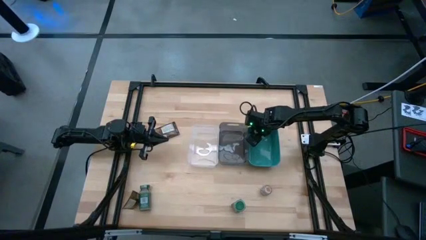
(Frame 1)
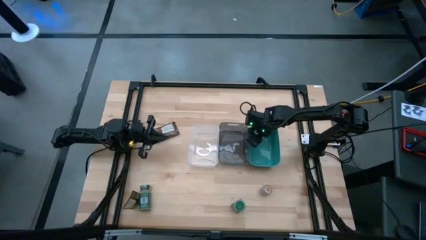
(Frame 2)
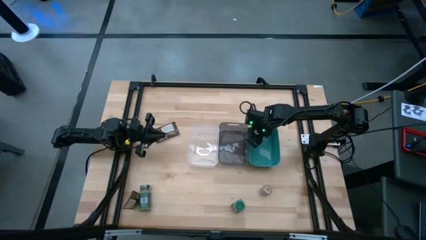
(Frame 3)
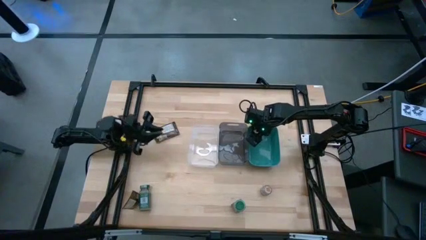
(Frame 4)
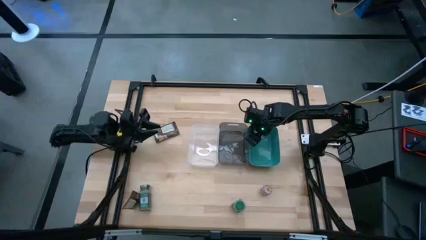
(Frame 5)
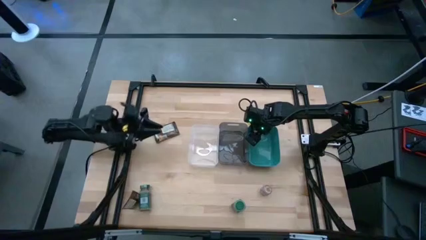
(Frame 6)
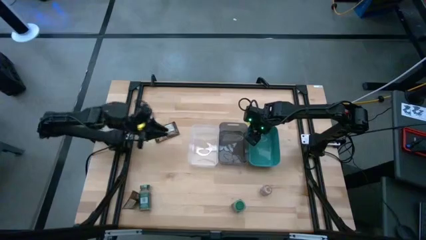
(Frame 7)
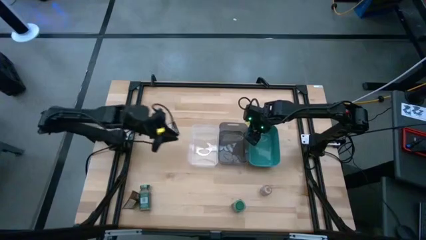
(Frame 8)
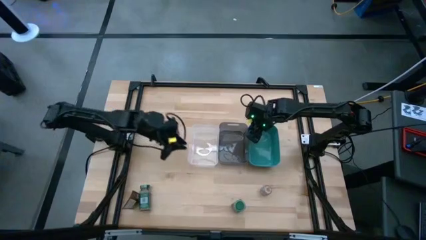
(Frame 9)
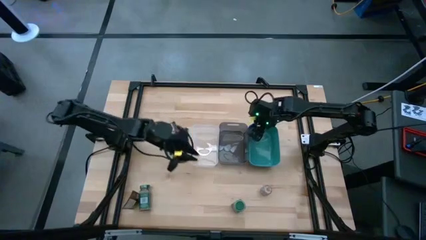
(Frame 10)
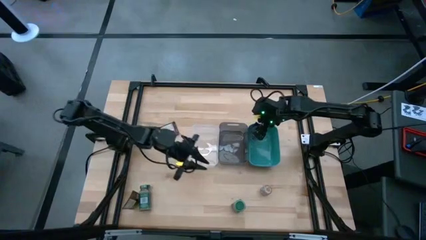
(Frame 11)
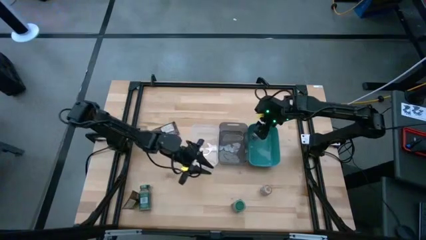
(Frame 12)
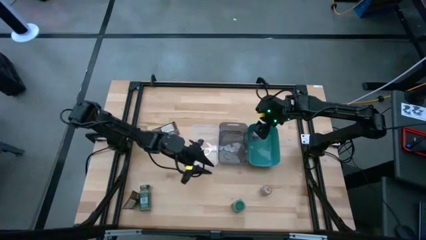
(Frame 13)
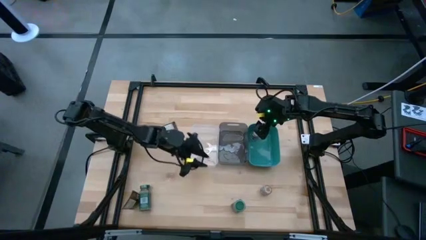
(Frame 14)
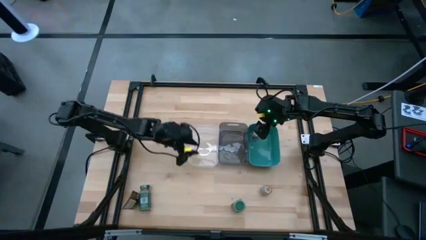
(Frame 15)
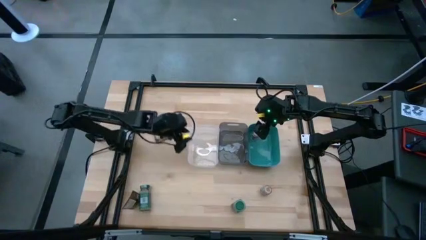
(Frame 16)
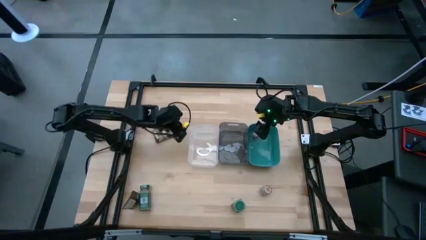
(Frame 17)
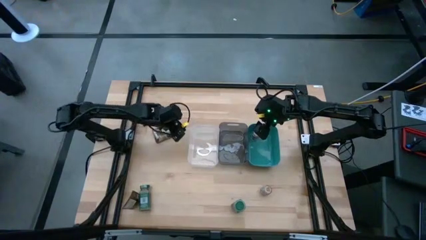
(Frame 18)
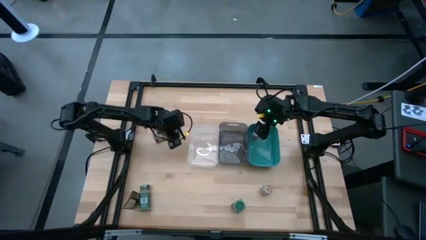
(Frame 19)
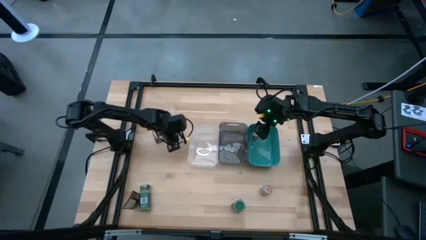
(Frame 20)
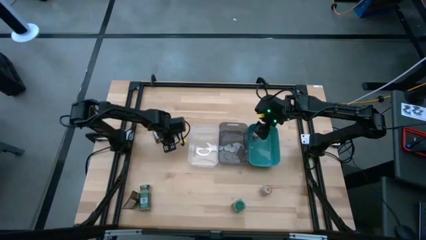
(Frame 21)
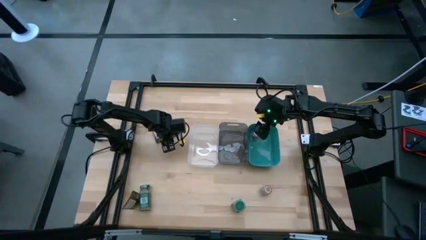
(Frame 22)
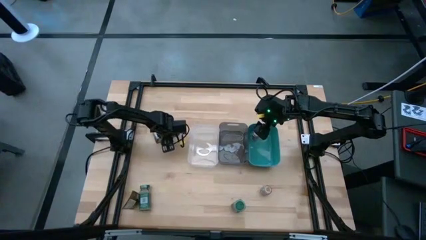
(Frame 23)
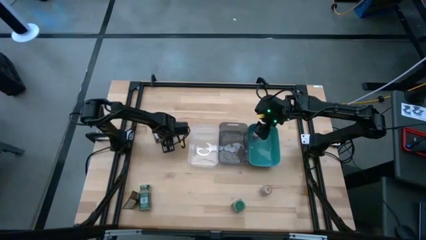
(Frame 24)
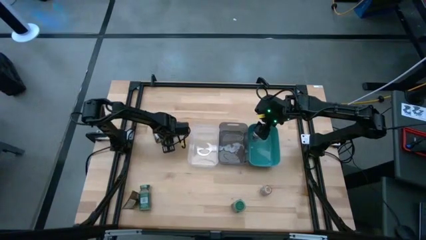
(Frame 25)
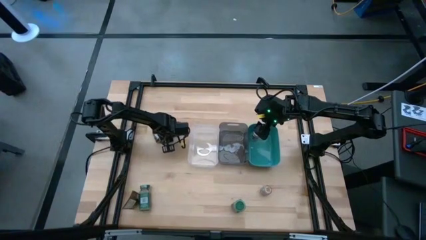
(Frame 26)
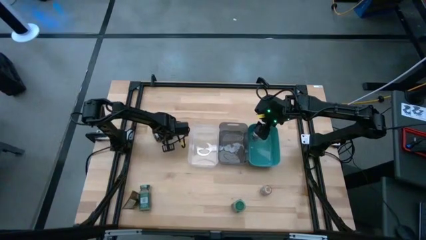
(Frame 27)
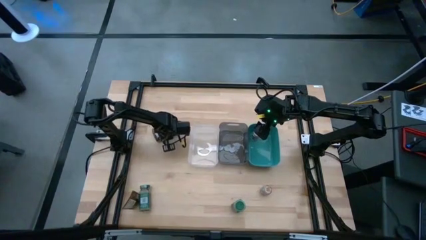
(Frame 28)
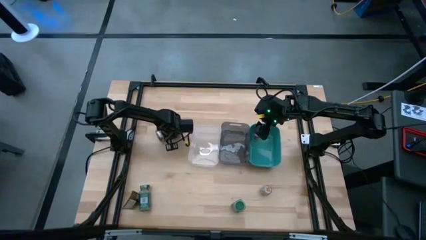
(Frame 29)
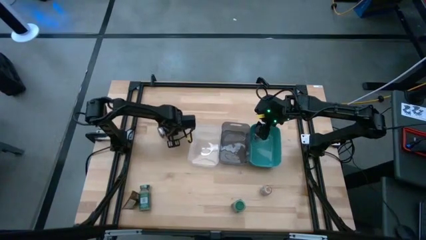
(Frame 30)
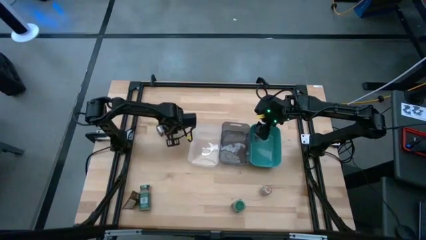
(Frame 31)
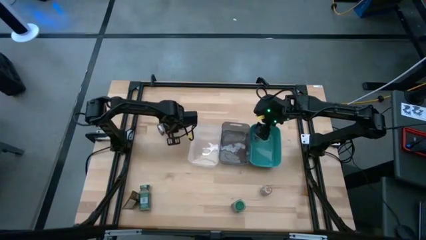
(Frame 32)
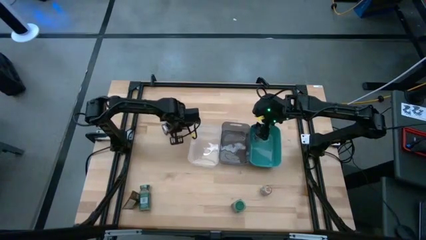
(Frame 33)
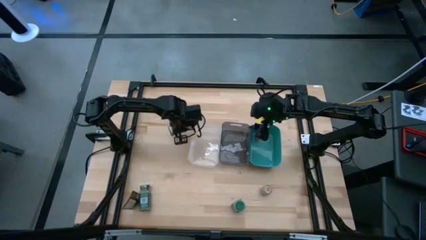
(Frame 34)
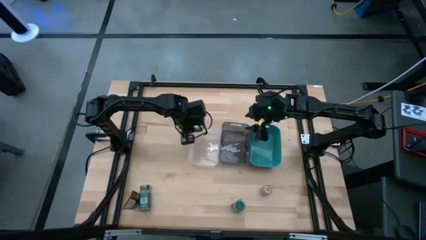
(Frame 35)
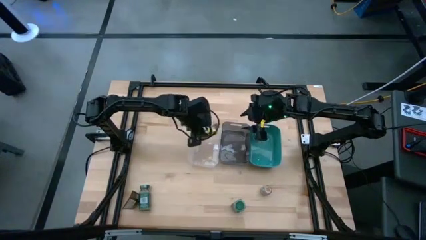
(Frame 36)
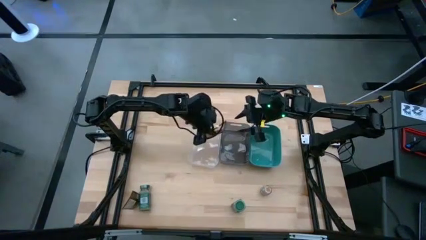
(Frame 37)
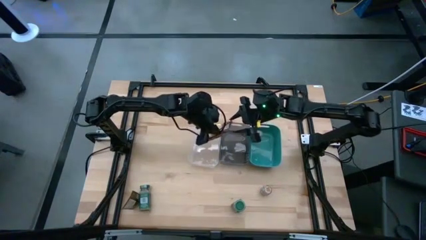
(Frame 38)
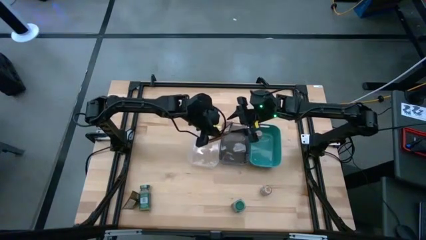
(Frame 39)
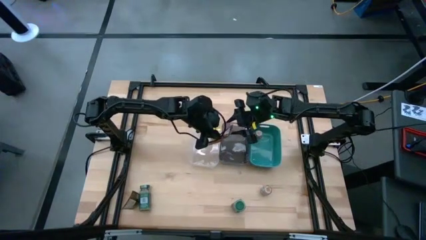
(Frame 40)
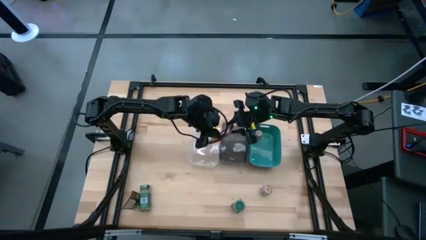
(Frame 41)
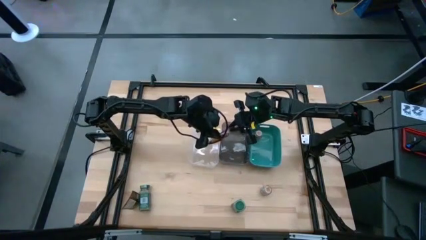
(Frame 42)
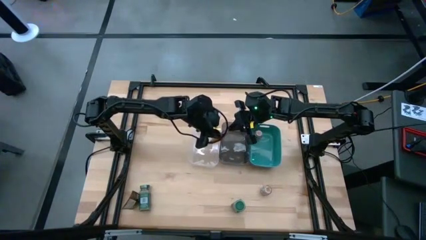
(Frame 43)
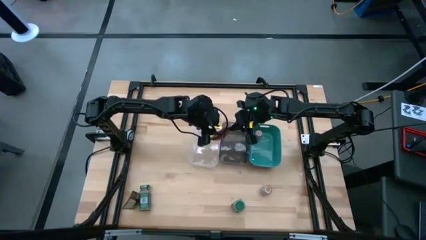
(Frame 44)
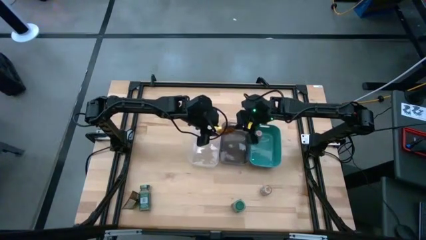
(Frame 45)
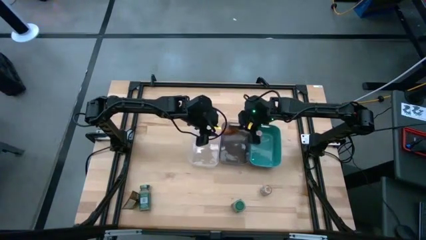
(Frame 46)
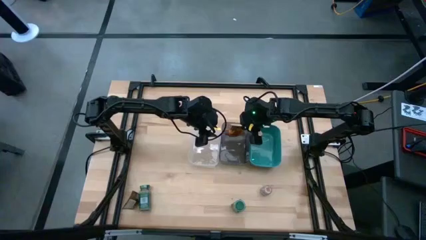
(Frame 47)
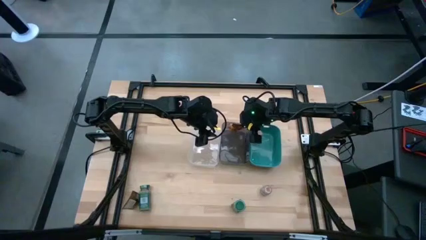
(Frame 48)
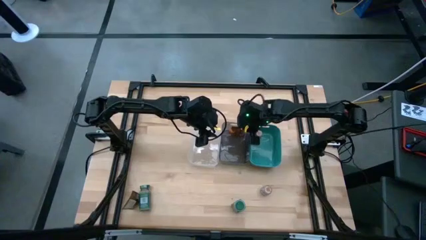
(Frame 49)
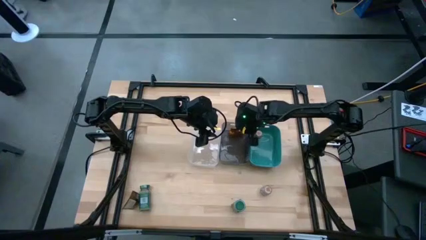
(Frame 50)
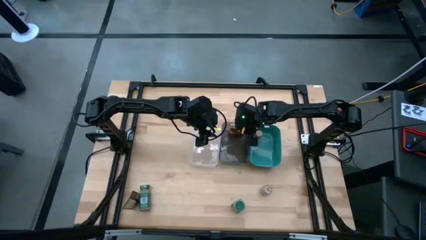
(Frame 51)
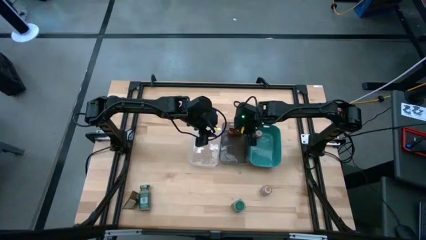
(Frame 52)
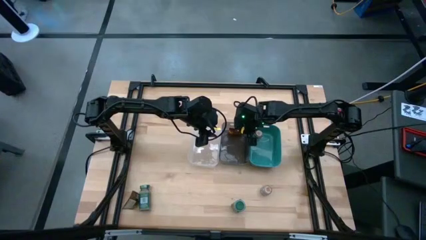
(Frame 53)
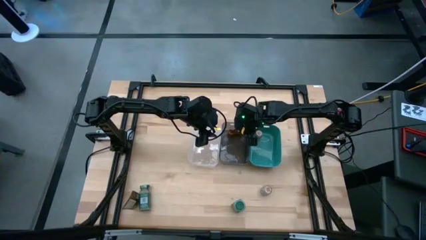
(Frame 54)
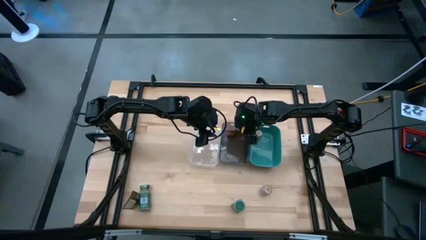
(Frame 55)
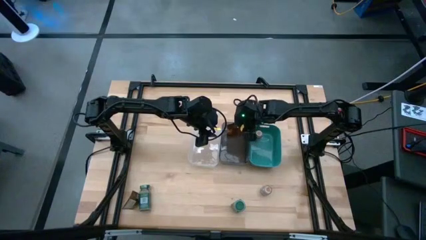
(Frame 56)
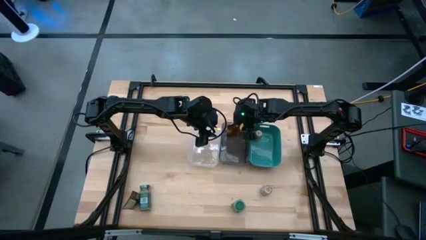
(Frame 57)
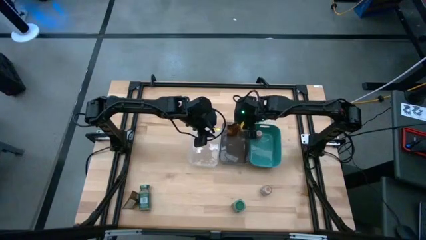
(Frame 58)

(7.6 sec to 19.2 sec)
Task: Sort spices by type
Put the top orange seasoning pack into the black bin

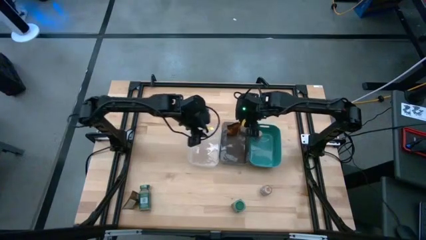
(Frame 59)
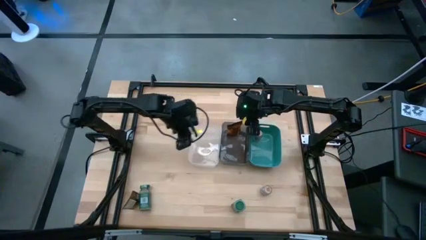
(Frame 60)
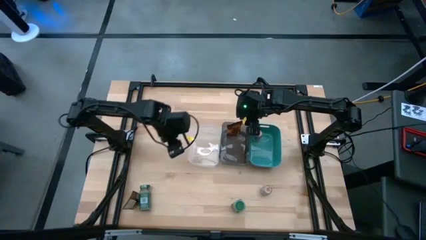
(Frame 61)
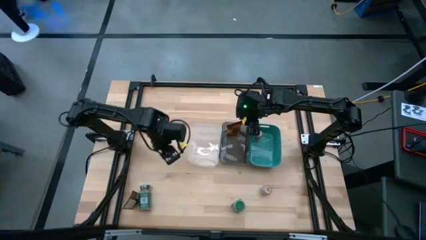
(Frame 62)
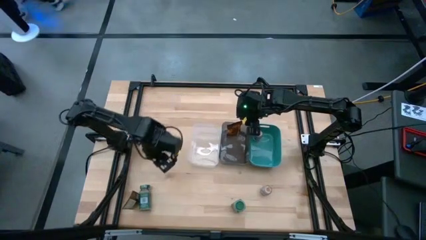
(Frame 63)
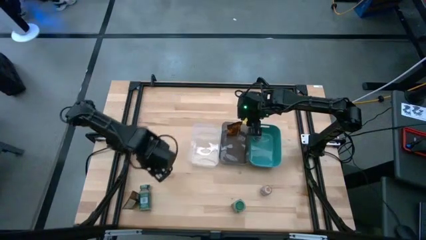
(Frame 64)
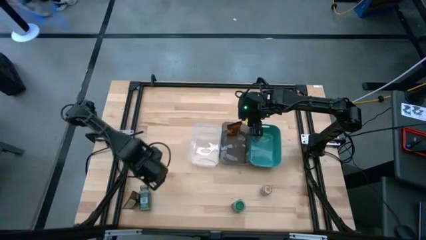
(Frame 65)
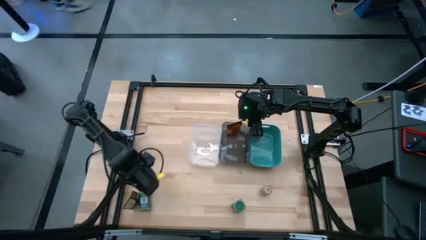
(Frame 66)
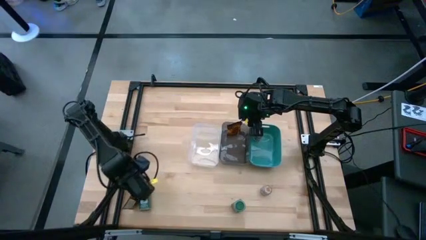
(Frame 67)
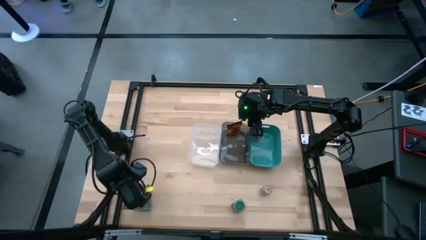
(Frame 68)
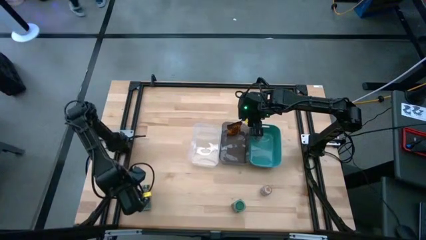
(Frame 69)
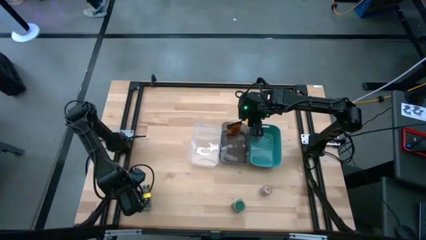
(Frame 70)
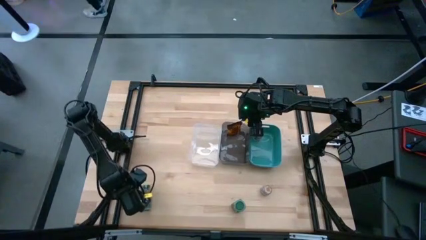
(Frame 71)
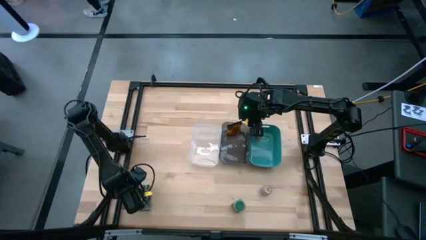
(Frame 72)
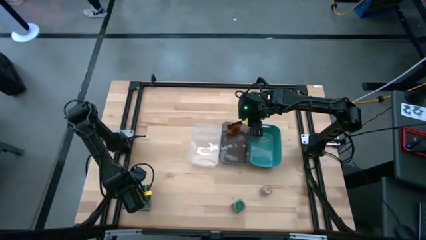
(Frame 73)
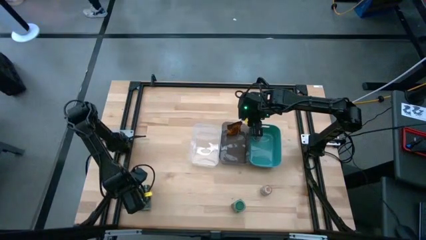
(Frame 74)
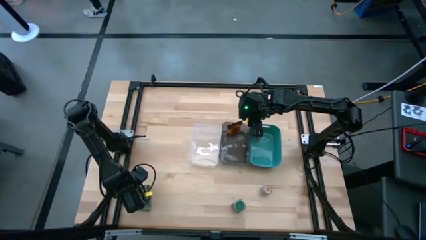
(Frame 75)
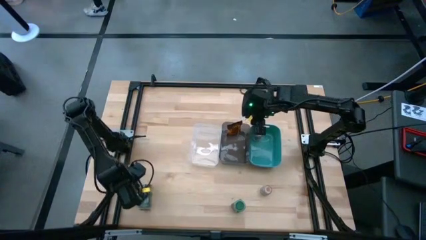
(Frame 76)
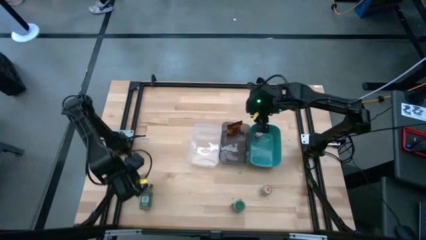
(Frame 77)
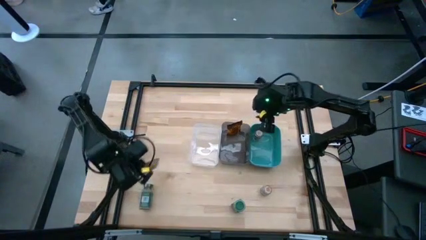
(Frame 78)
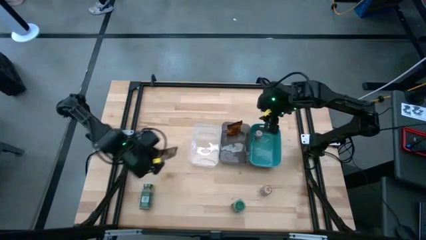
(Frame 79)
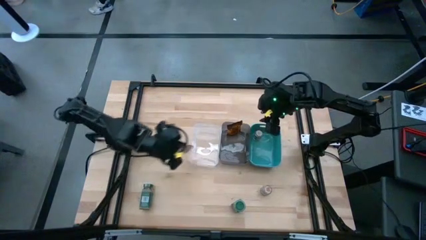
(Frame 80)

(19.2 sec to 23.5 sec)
Put the orange seasoning pack into the black bin
